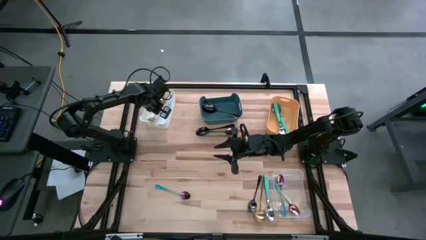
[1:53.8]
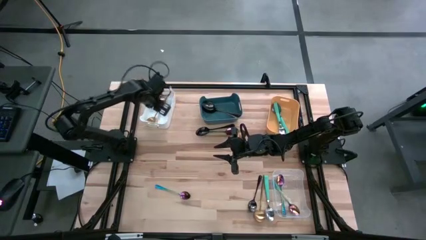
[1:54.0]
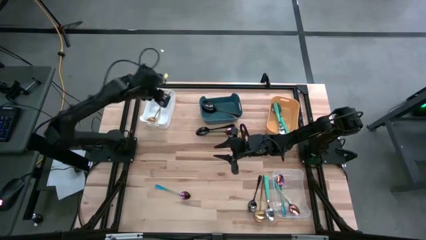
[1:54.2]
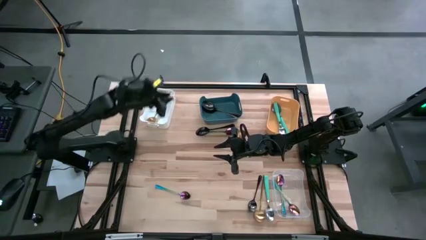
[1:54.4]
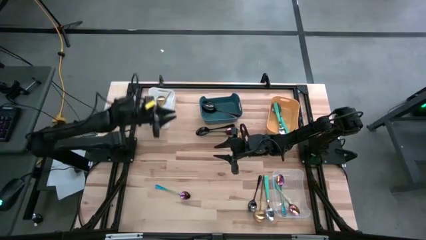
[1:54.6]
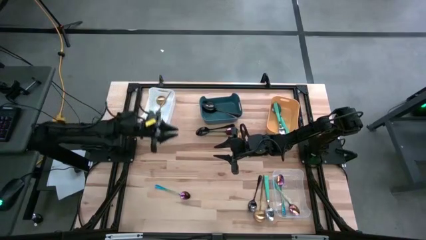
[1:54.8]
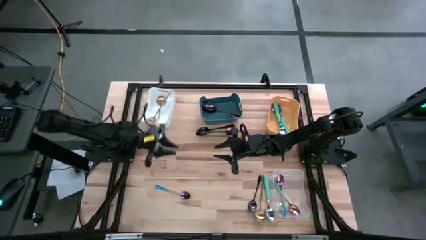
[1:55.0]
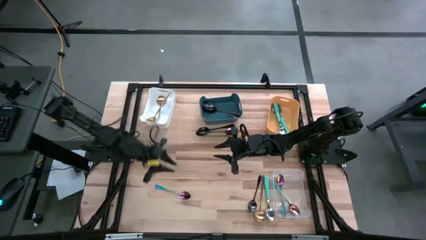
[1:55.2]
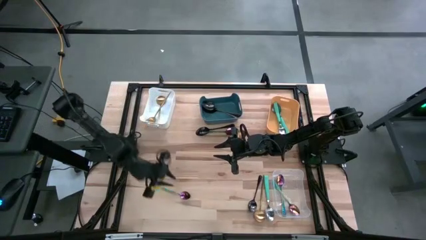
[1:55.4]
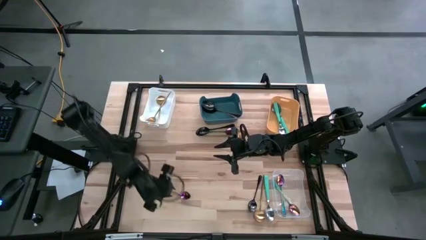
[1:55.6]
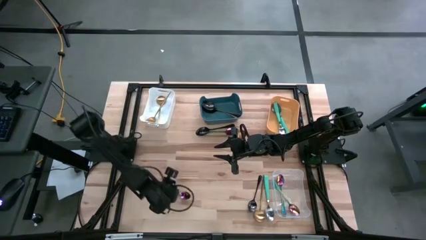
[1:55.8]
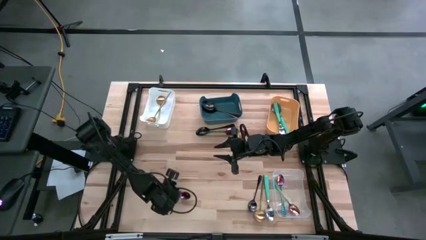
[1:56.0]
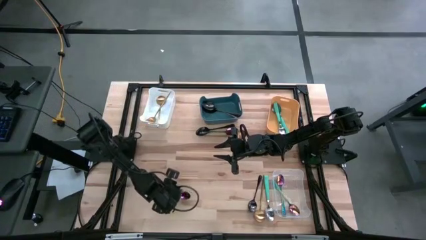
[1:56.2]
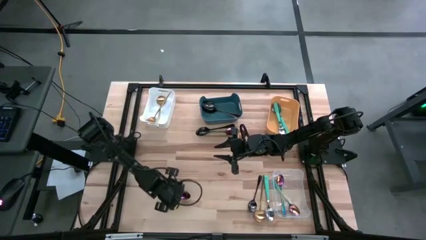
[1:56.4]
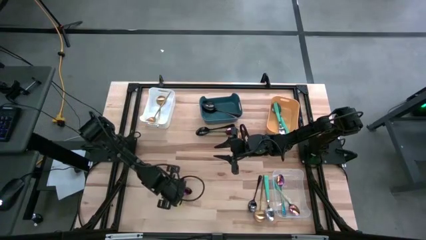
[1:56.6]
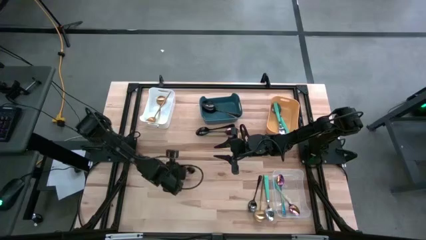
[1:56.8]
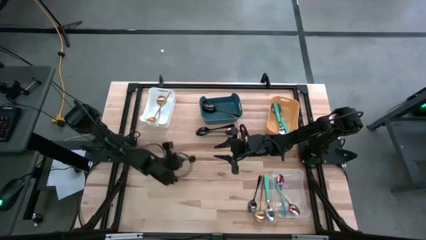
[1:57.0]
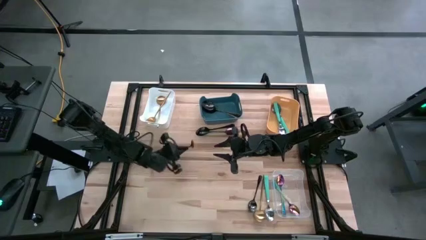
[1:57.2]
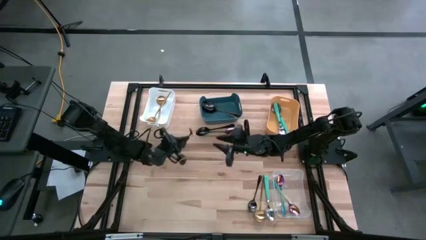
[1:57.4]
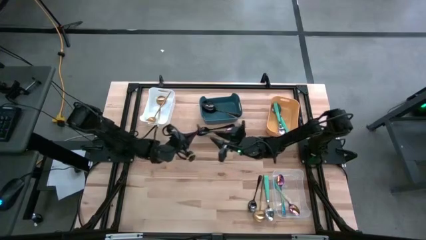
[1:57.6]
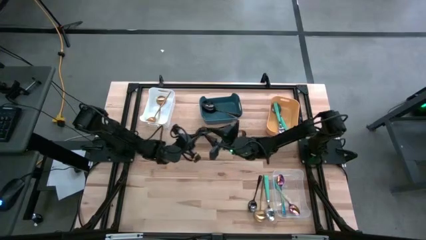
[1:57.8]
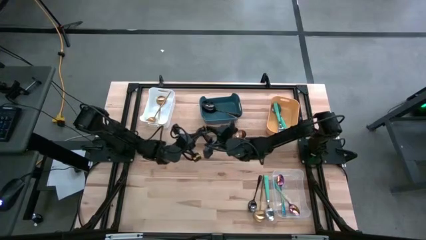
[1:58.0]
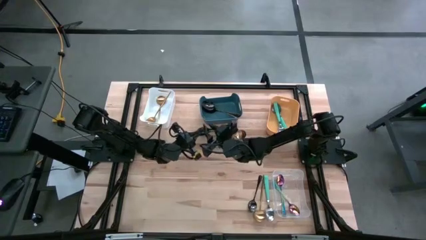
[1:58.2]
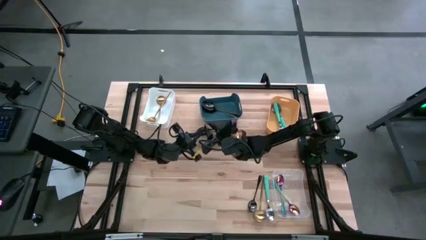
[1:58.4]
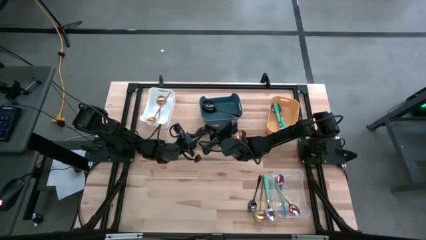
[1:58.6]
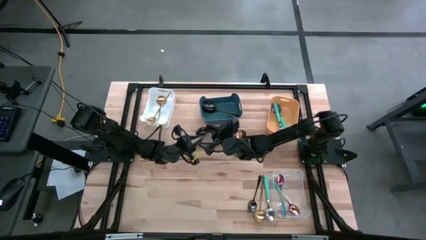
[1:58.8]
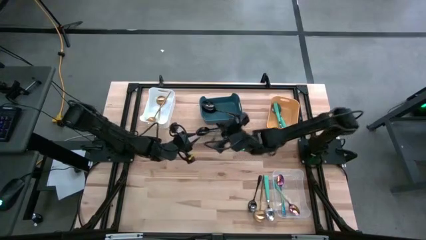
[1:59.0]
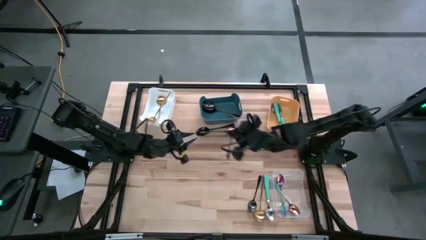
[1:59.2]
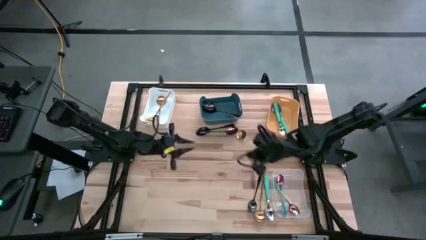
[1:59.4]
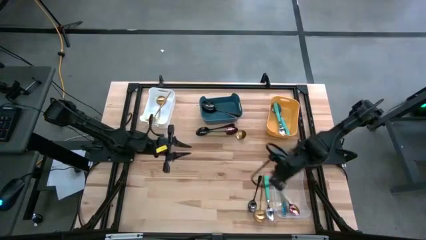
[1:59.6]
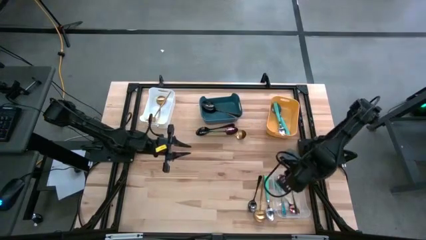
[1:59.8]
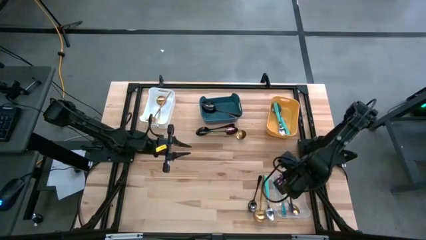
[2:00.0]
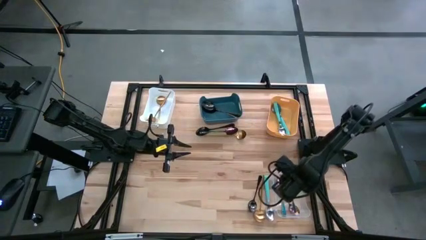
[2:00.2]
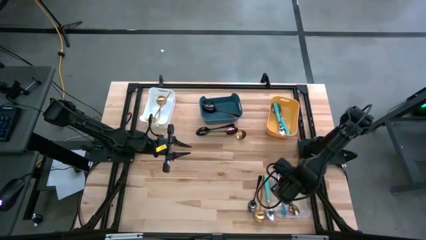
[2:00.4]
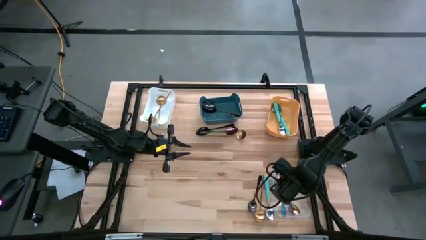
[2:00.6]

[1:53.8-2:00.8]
Task: Sort silverware by color (type)
Put the purple spoon into the transparent bin

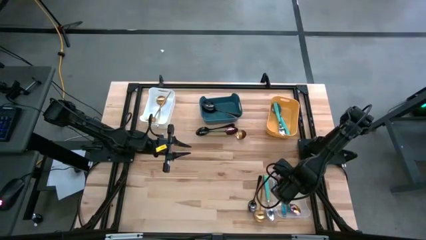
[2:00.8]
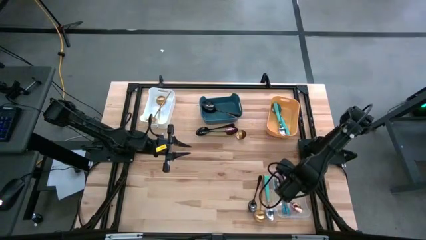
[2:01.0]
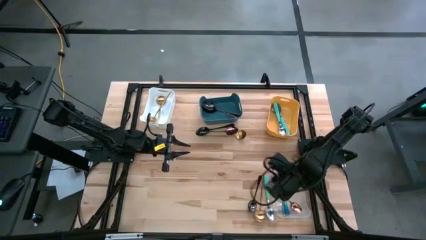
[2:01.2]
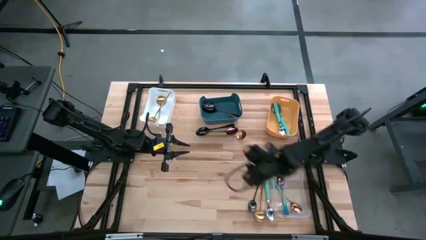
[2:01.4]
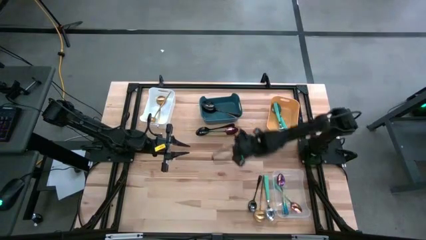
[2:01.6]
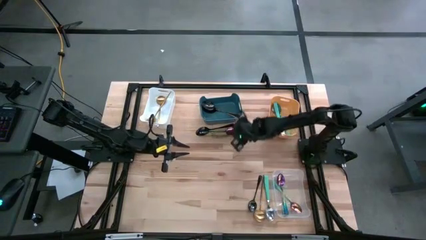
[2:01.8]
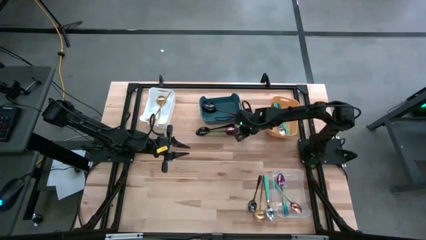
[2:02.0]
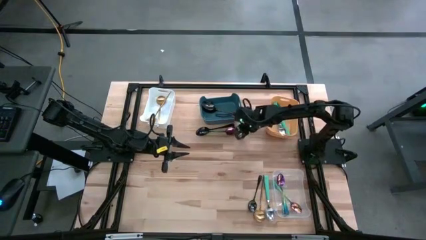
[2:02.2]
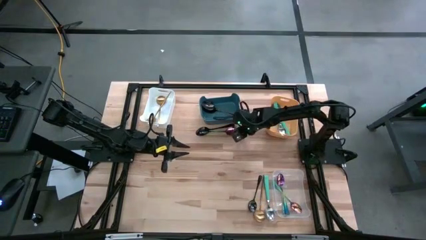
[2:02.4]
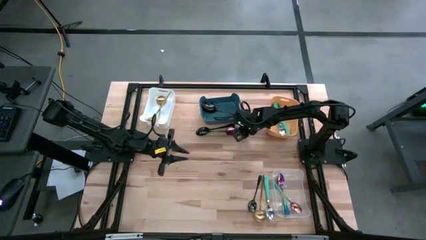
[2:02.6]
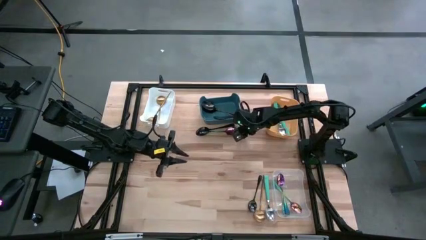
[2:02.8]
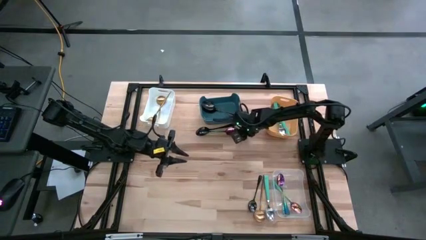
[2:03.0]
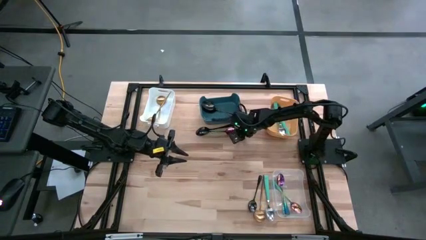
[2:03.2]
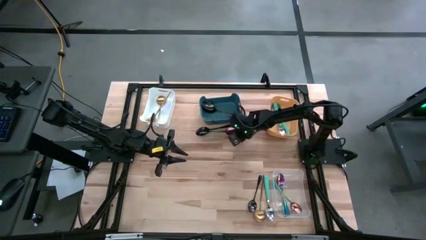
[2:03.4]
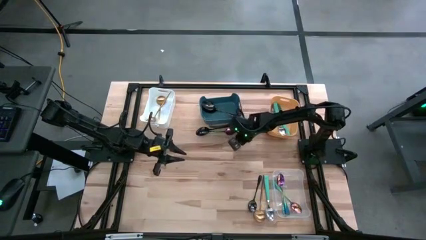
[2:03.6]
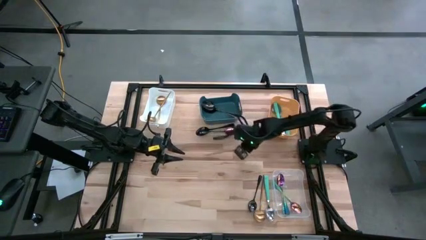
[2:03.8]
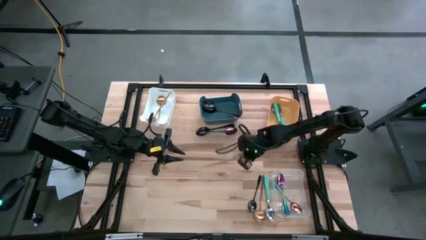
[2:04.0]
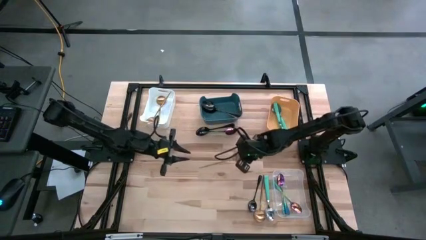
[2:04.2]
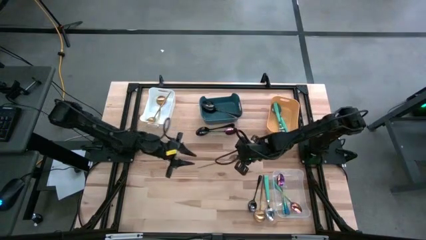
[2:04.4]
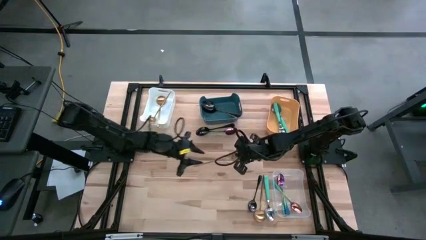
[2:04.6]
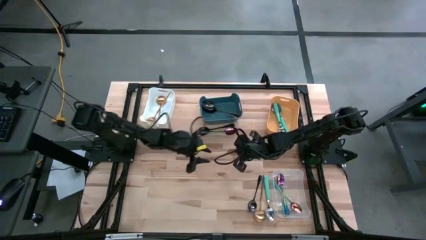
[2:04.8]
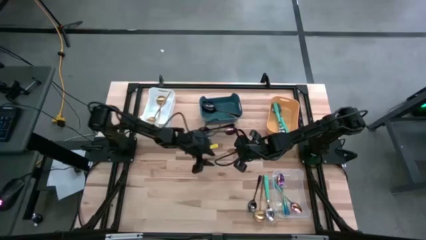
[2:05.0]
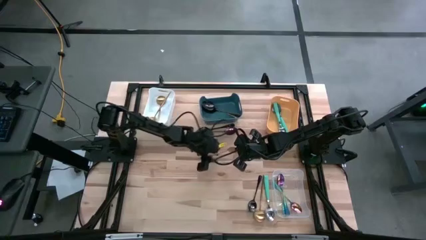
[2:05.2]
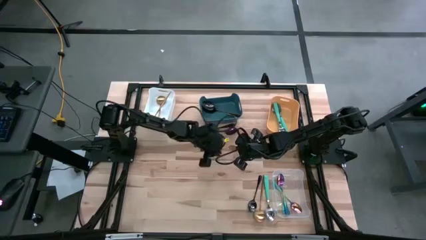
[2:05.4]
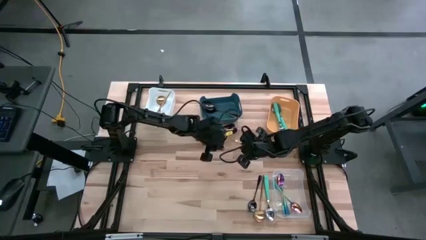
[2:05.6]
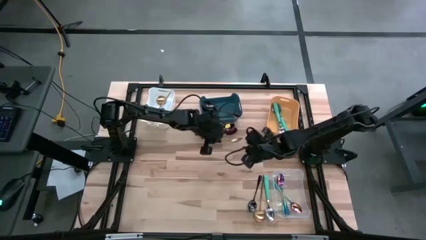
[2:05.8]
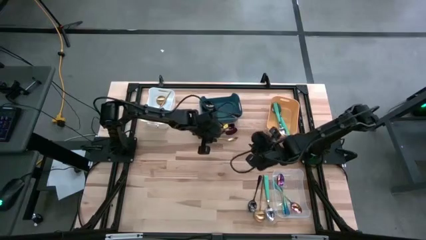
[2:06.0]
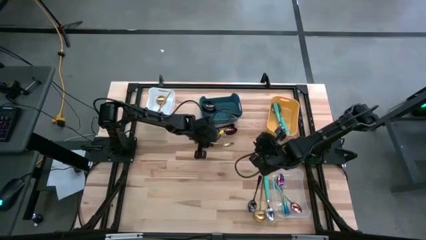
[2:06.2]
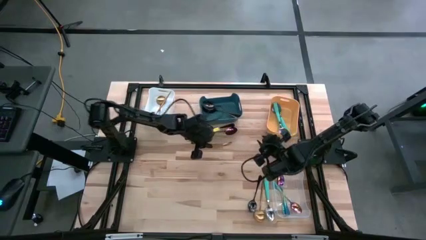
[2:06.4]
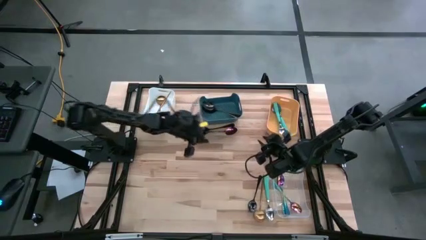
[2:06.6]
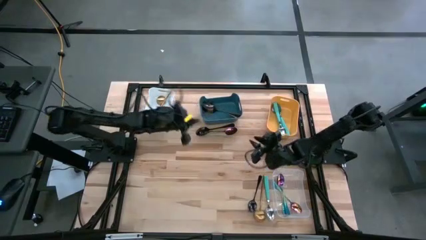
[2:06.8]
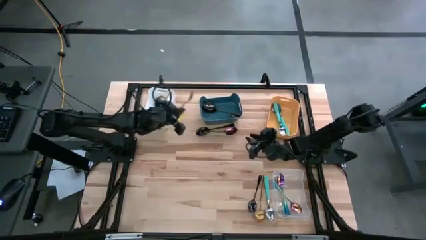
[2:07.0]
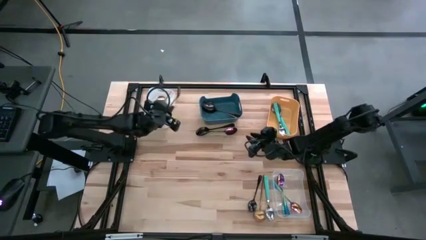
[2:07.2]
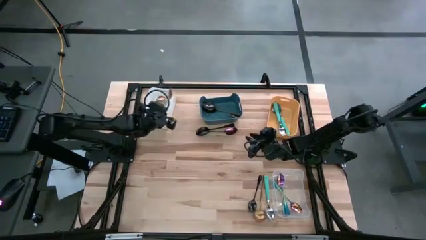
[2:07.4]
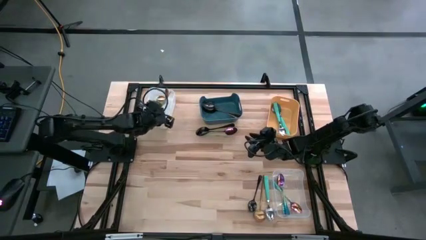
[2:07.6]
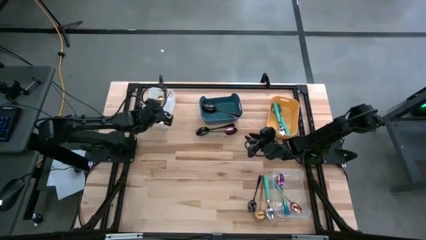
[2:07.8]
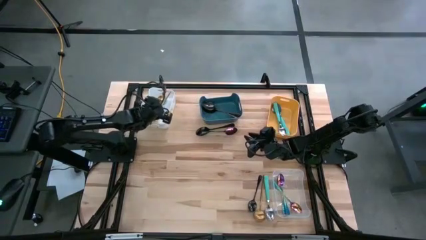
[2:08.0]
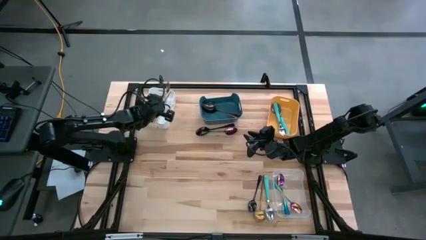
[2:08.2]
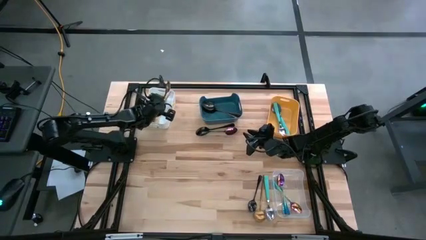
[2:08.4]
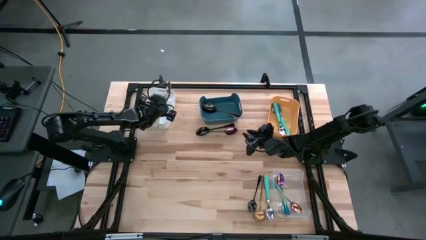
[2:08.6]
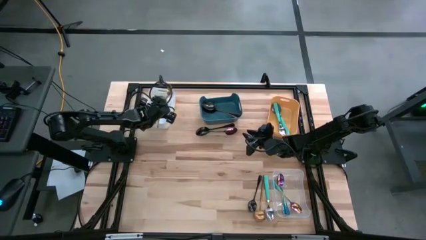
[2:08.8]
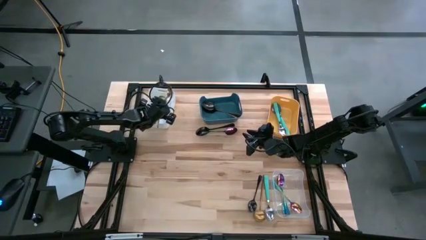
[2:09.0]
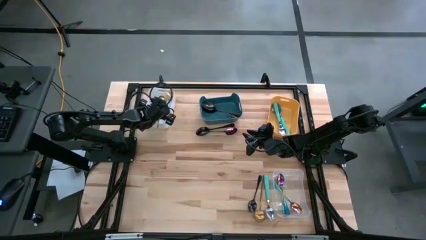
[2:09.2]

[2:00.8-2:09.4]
Put the gold spoon into the white bin
